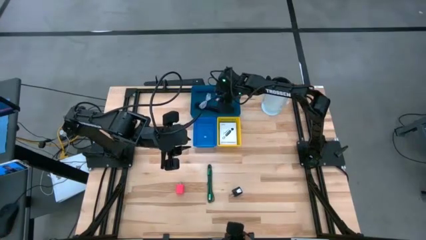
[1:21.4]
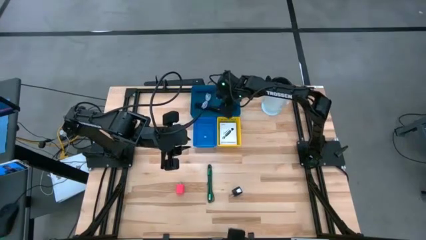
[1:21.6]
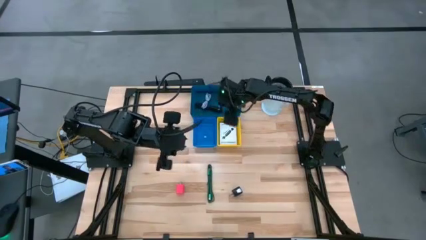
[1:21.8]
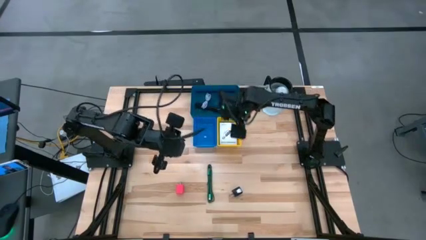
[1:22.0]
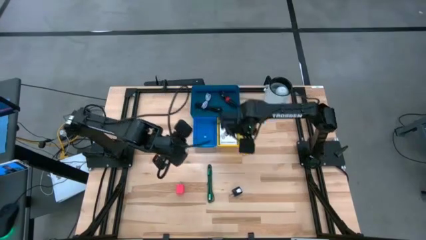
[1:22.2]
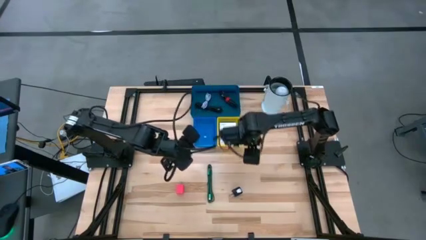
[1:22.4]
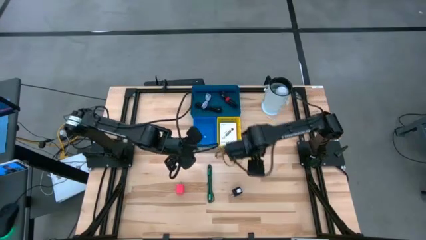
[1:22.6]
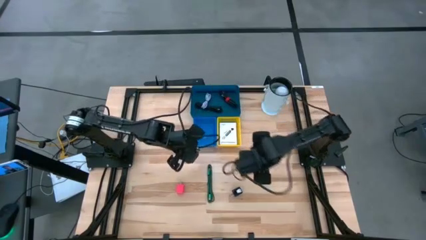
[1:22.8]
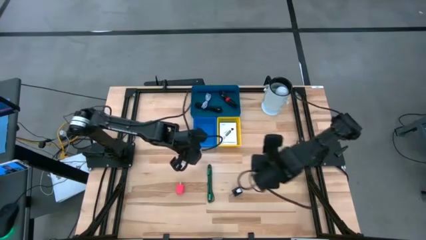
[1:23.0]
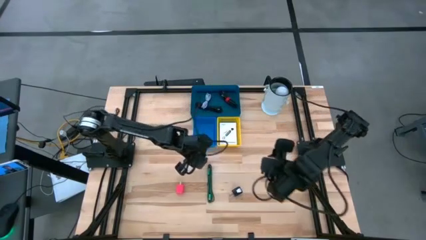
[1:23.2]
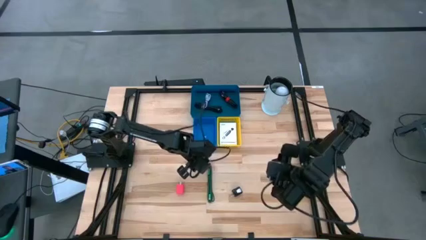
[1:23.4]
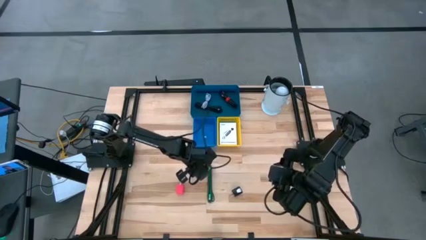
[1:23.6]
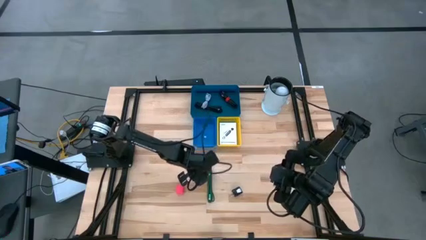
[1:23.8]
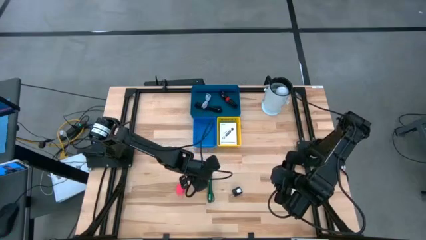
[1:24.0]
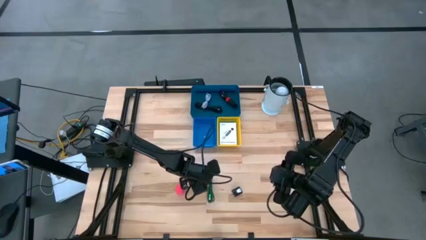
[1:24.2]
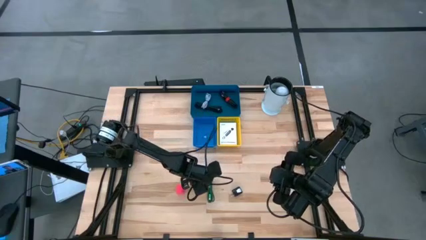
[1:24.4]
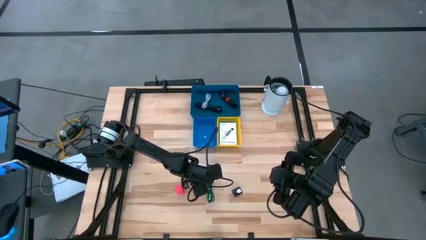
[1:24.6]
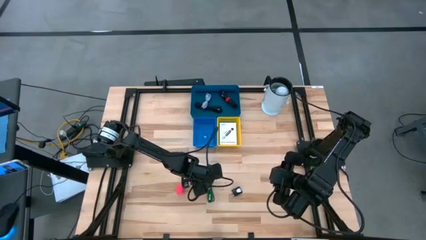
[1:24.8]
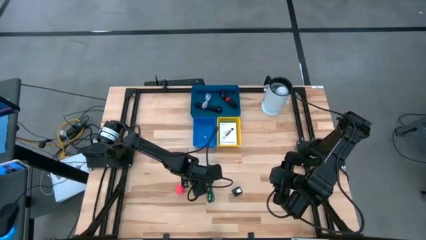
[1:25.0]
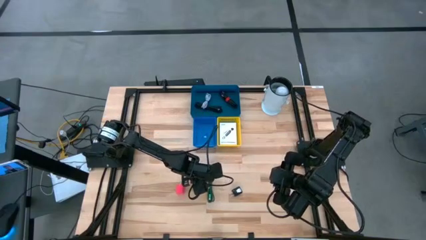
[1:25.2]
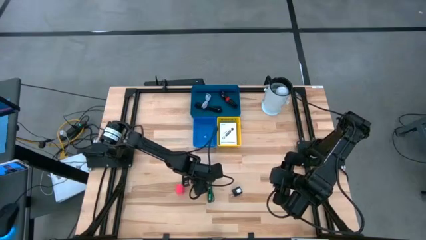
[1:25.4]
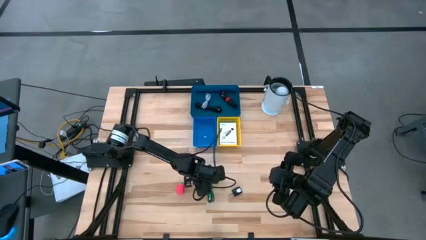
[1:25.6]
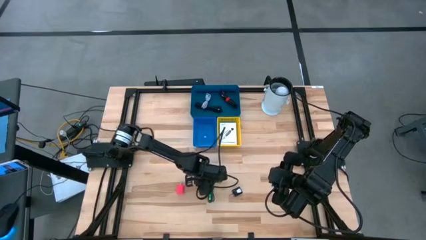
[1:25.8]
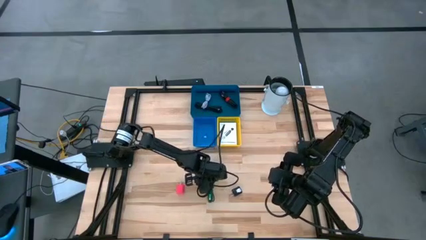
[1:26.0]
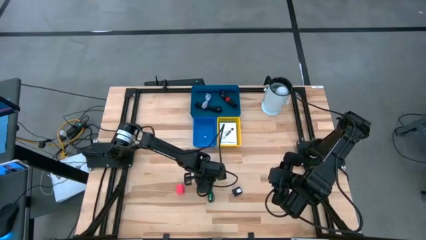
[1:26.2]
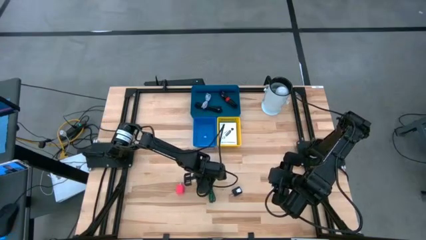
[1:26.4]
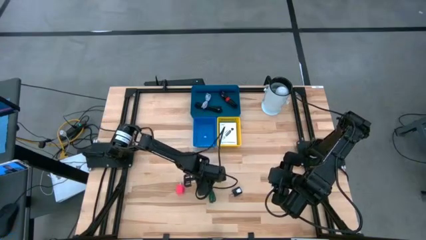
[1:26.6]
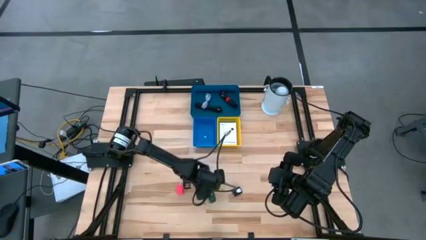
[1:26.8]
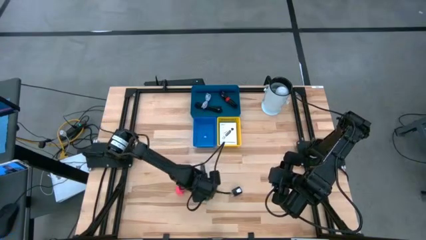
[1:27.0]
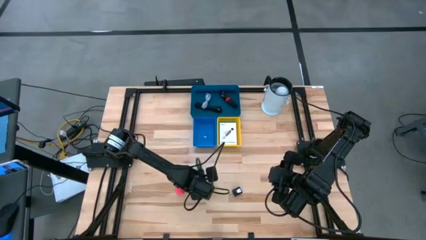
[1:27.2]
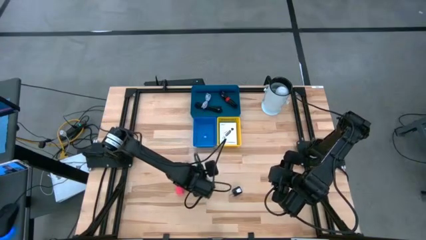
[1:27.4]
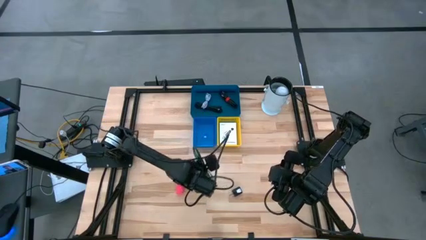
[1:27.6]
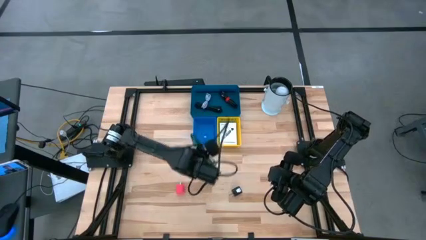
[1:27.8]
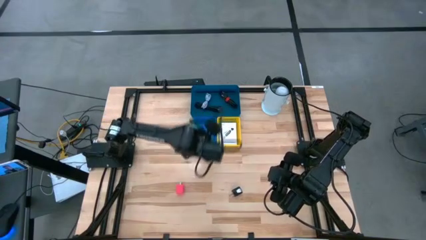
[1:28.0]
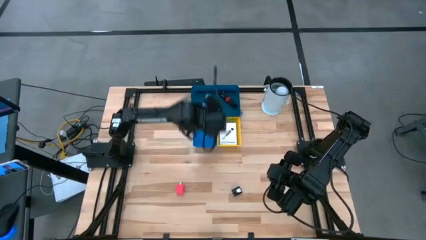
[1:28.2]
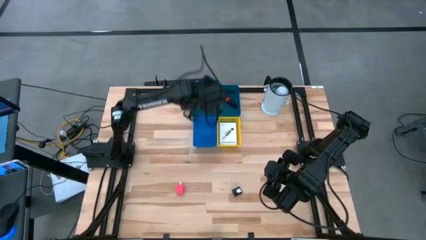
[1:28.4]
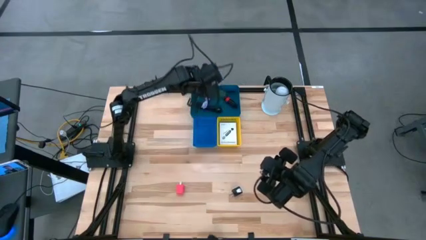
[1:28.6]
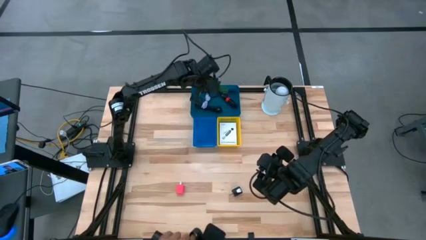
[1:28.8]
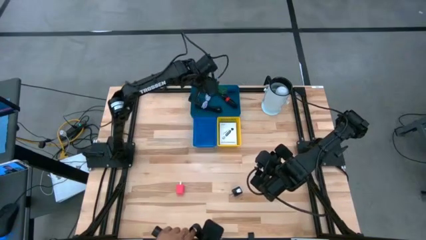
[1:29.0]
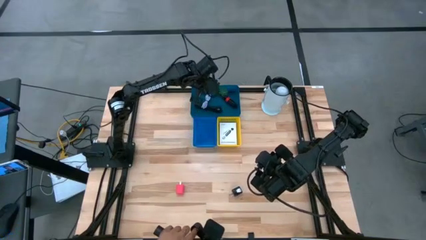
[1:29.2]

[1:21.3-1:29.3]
Task: Pick and place items into bin
Put the green charger cable into the dark blue bin

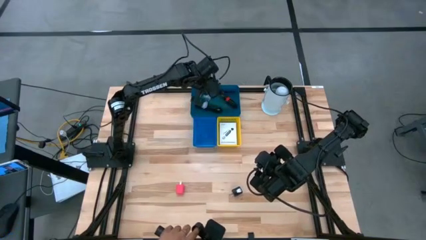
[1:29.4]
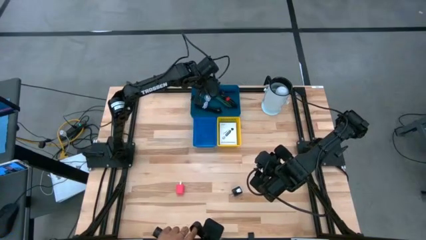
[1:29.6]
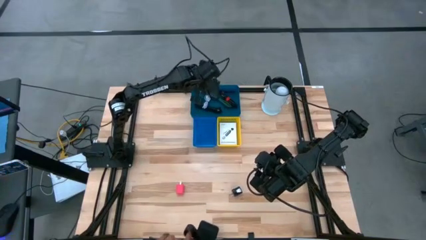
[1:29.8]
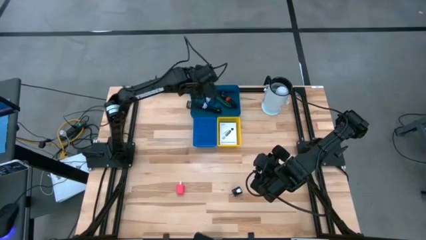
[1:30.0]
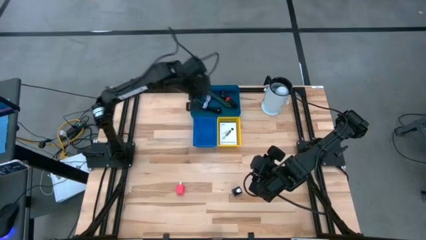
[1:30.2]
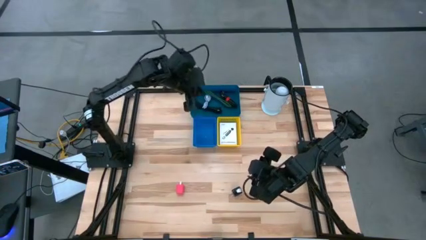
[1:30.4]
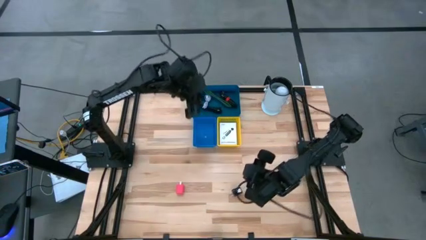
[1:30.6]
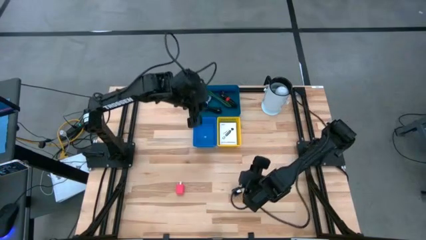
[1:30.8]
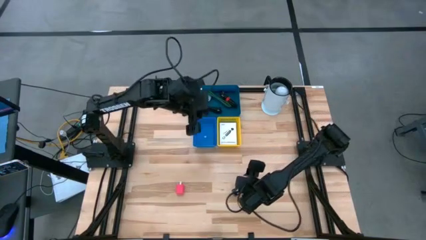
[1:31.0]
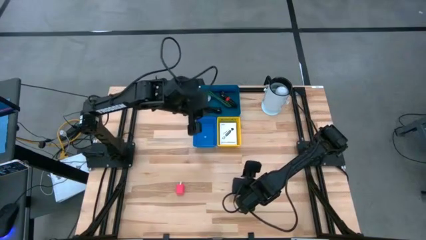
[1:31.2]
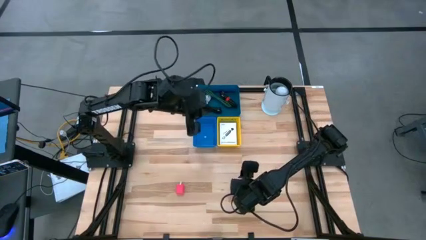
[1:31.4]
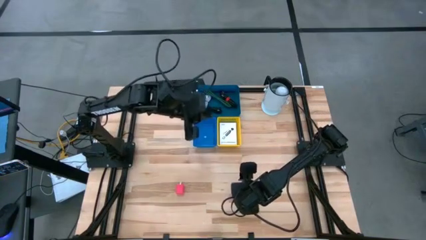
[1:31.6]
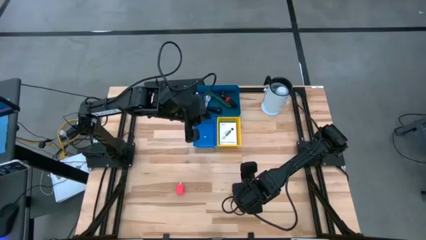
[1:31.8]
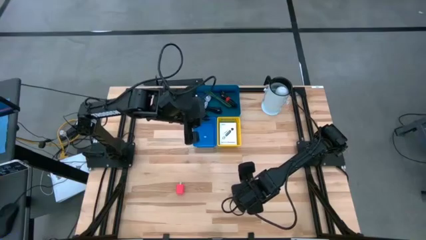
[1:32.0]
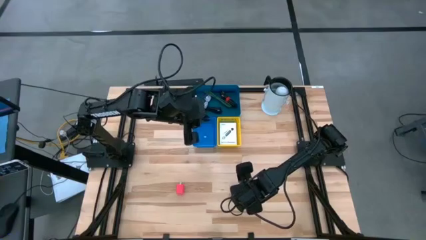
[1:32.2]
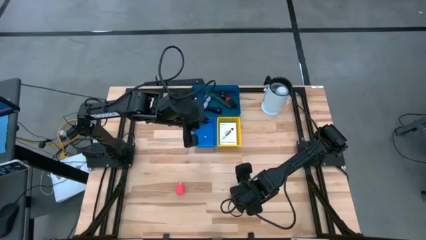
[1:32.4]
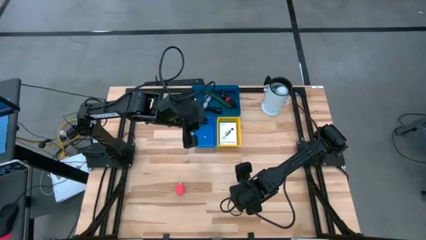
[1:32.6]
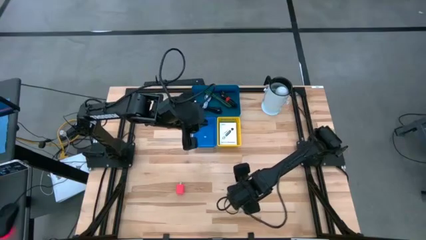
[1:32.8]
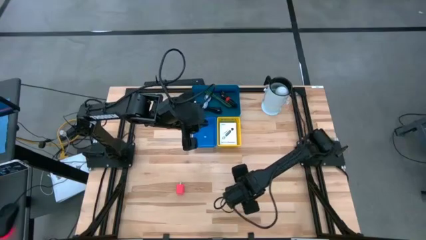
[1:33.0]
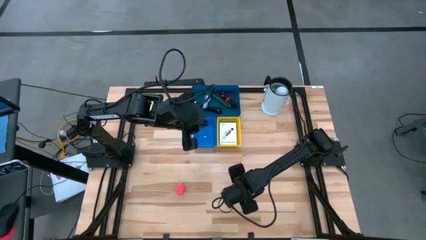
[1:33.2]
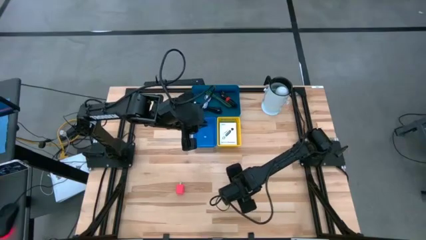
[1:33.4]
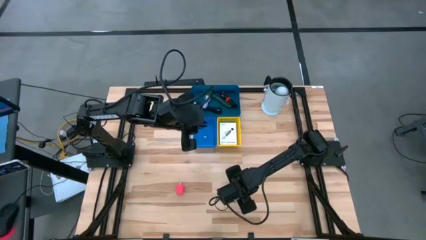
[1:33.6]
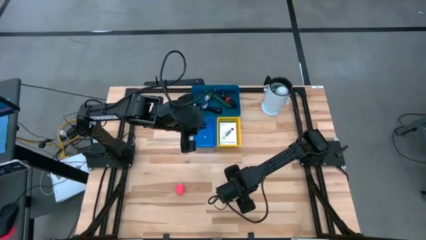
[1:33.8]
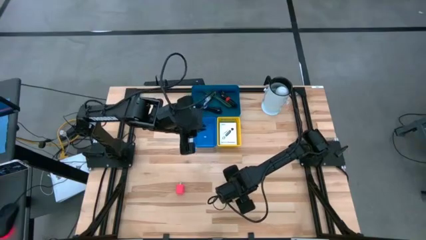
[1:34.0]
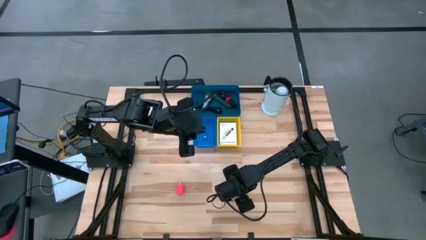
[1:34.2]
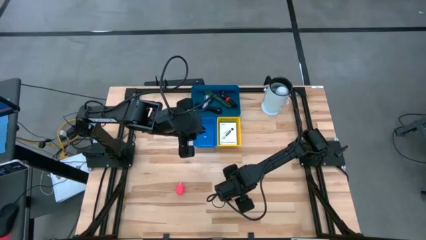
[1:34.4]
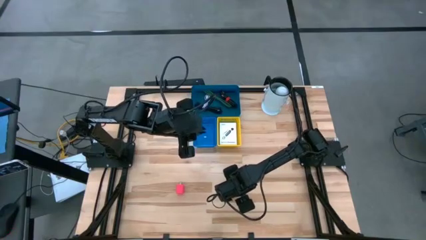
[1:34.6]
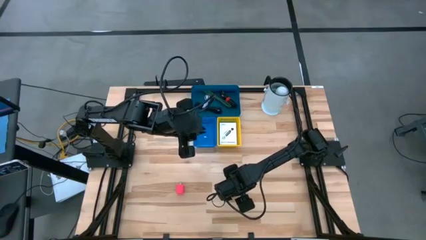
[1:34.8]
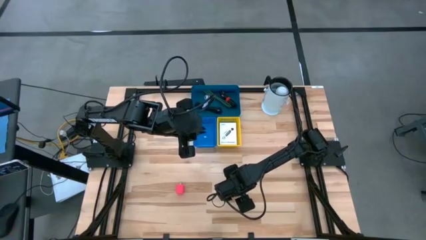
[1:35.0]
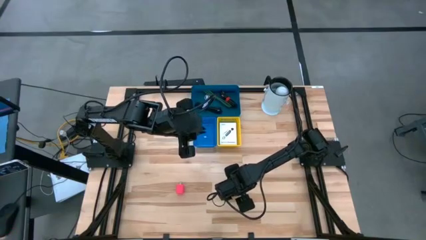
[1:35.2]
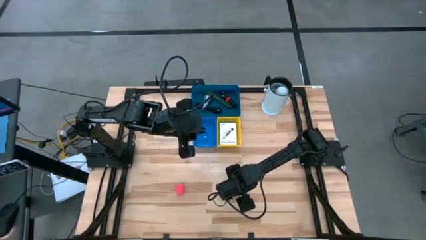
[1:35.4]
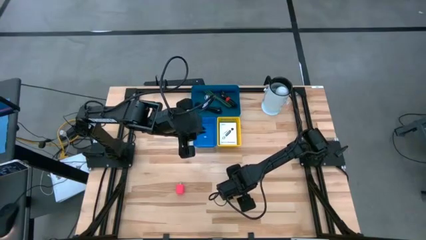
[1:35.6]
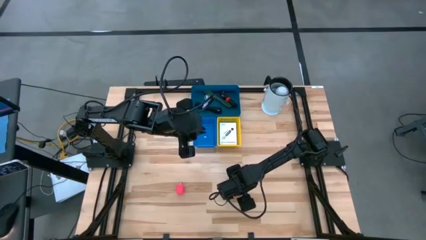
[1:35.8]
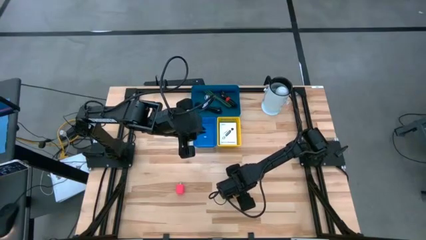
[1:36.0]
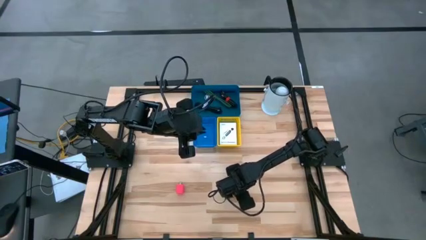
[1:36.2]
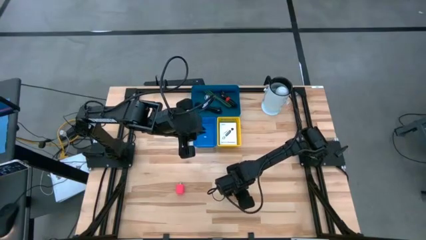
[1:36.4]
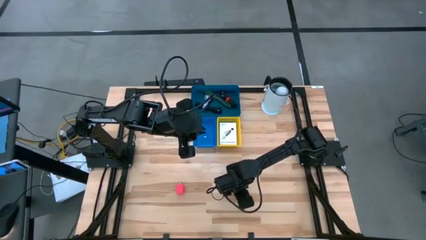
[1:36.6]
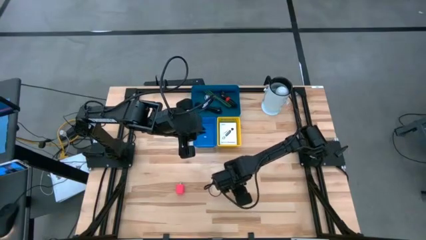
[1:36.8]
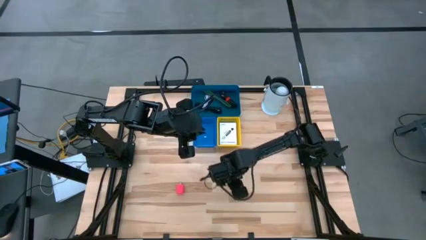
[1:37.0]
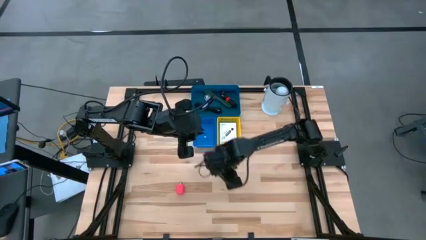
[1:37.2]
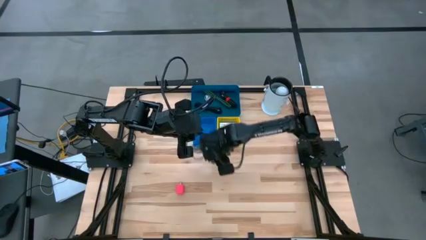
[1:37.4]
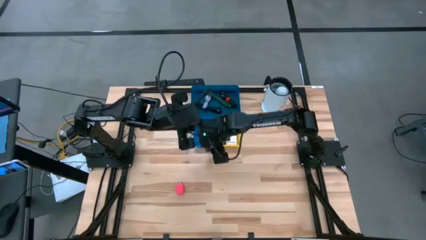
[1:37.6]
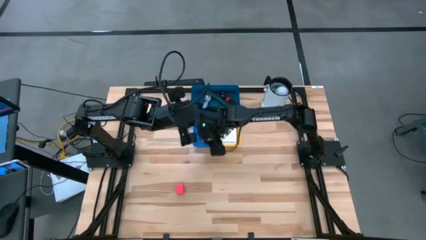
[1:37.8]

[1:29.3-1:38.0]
Put the black charger adapter into the blue bin
